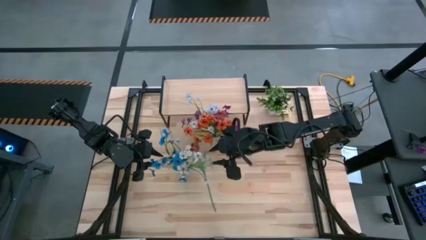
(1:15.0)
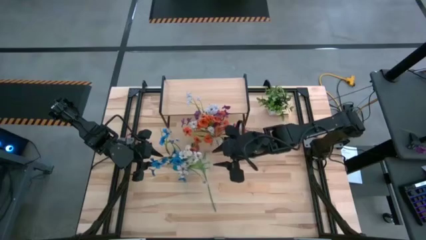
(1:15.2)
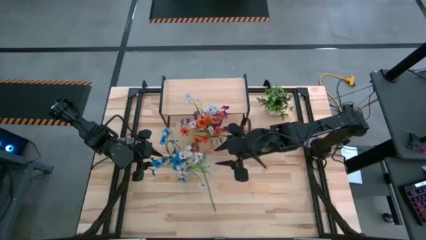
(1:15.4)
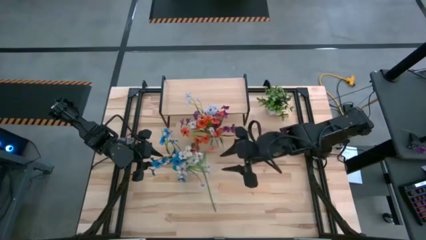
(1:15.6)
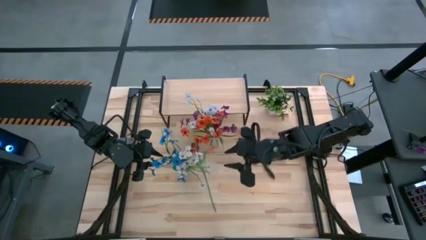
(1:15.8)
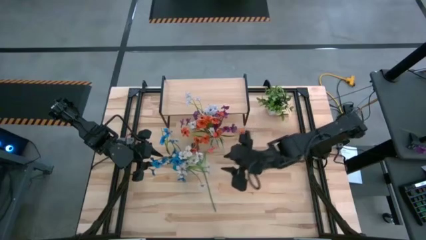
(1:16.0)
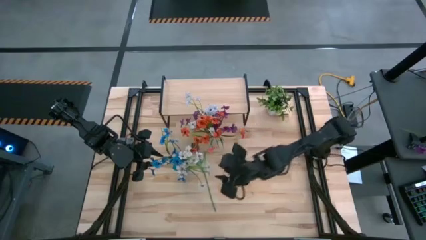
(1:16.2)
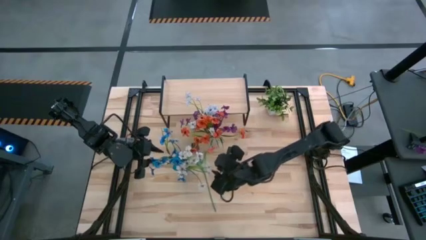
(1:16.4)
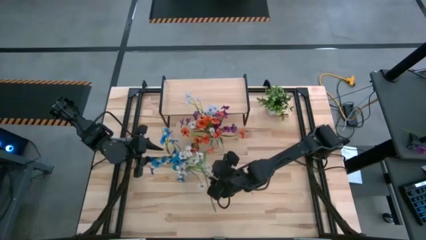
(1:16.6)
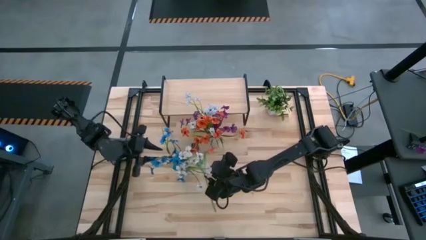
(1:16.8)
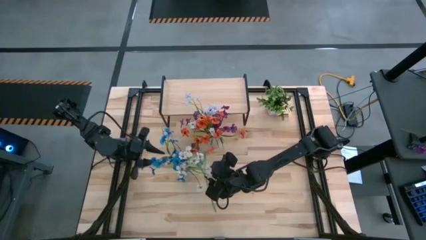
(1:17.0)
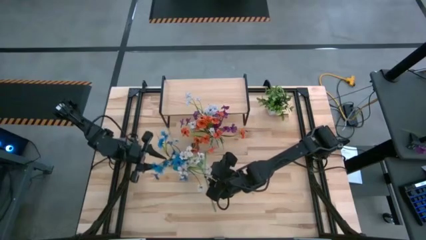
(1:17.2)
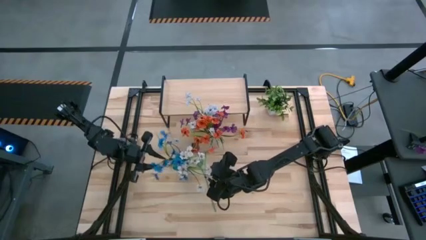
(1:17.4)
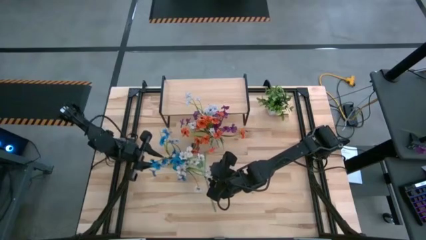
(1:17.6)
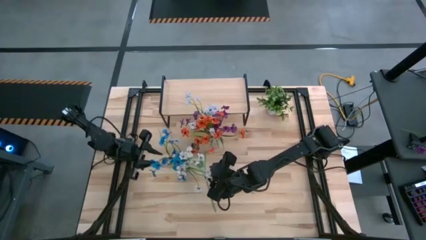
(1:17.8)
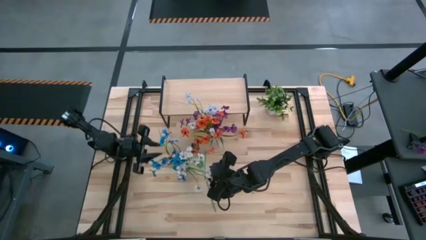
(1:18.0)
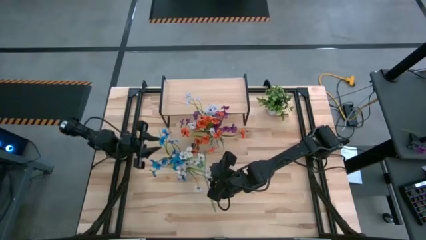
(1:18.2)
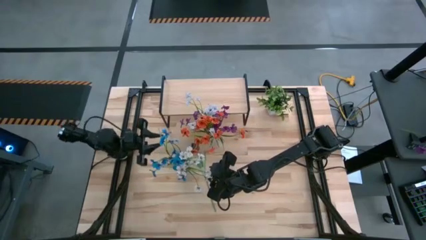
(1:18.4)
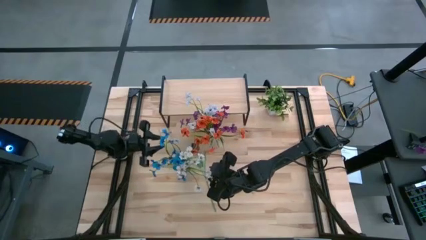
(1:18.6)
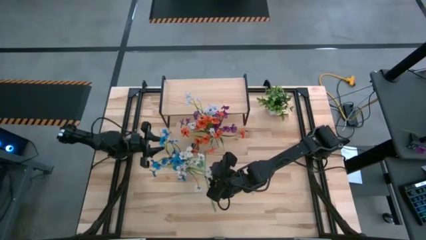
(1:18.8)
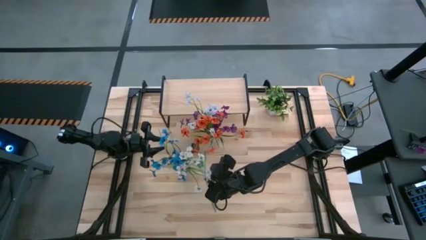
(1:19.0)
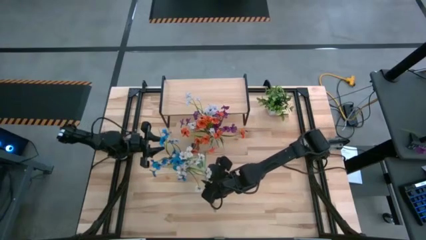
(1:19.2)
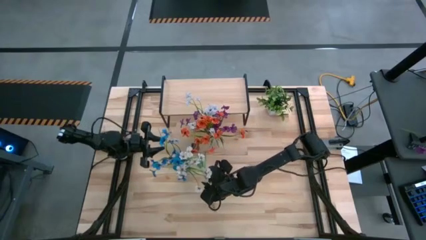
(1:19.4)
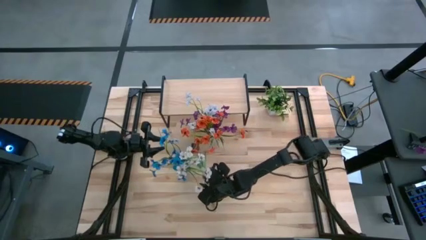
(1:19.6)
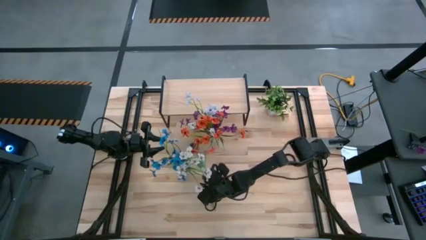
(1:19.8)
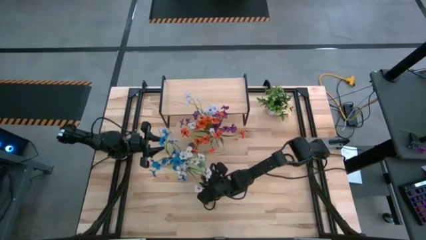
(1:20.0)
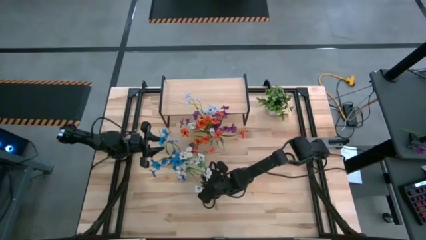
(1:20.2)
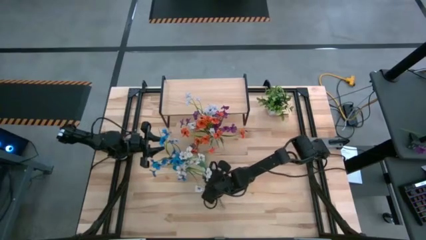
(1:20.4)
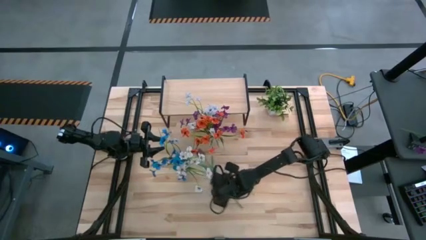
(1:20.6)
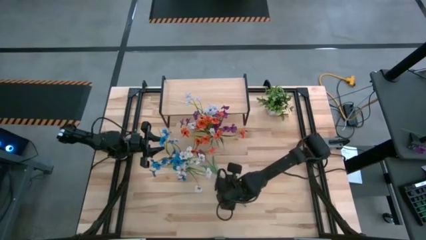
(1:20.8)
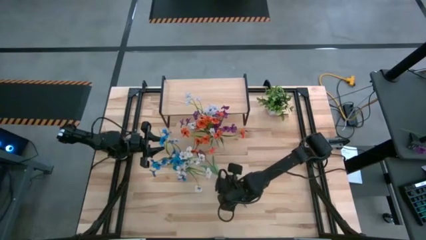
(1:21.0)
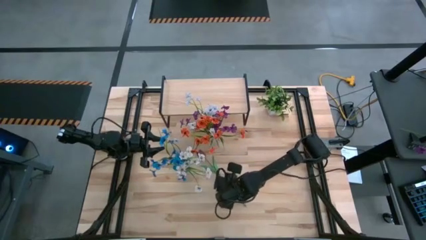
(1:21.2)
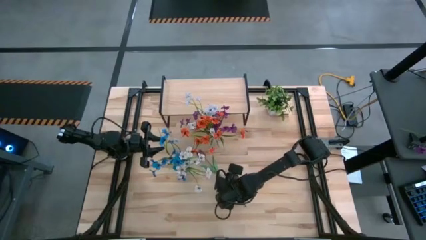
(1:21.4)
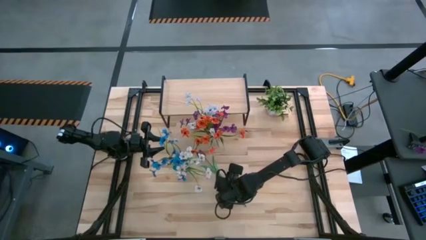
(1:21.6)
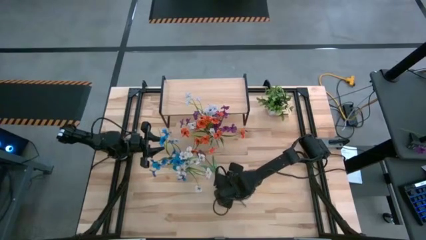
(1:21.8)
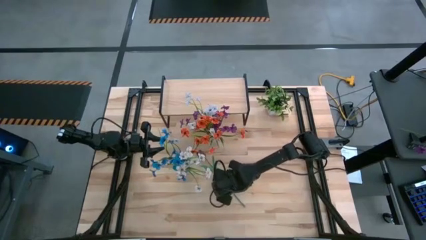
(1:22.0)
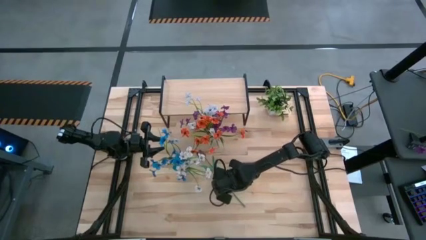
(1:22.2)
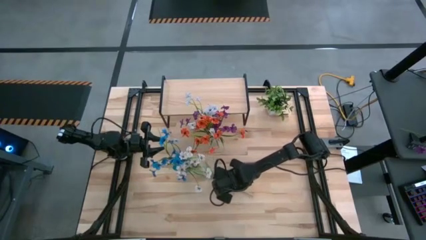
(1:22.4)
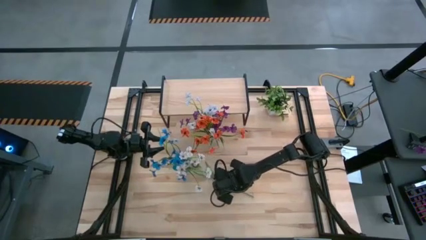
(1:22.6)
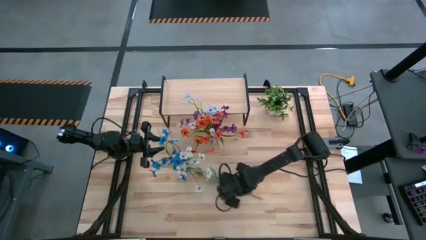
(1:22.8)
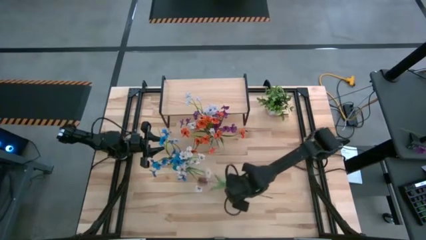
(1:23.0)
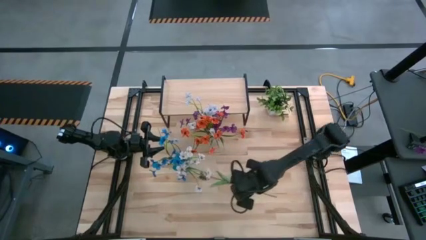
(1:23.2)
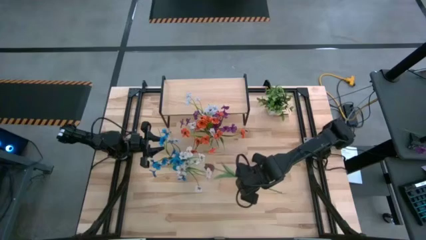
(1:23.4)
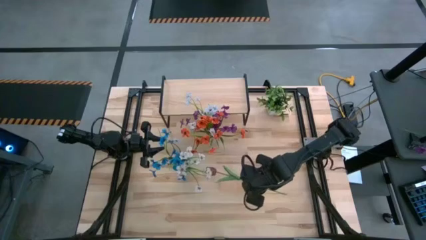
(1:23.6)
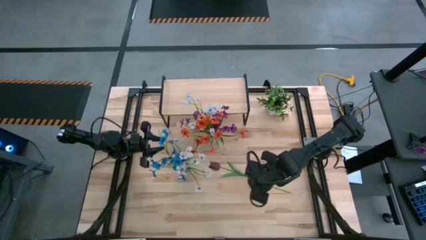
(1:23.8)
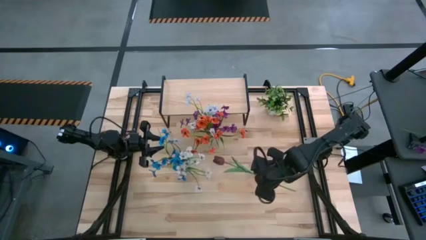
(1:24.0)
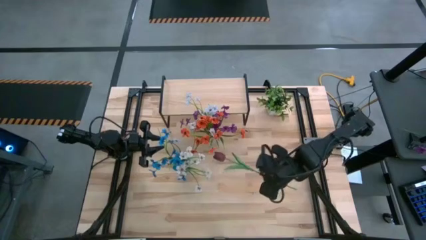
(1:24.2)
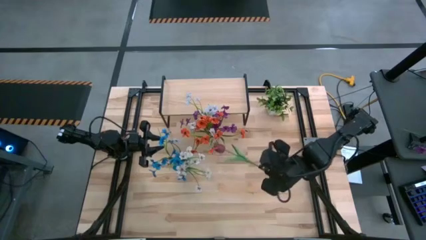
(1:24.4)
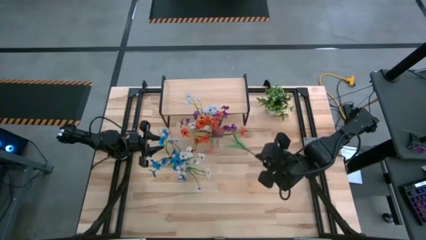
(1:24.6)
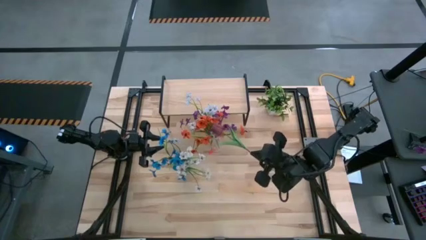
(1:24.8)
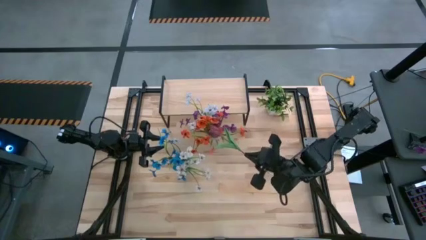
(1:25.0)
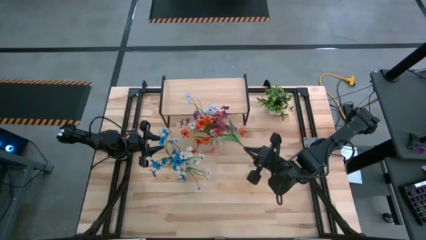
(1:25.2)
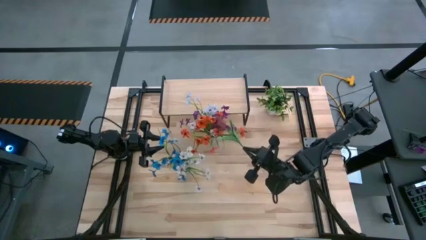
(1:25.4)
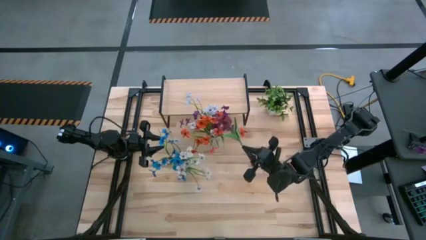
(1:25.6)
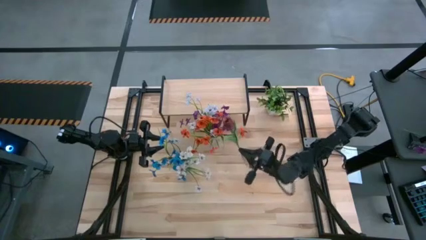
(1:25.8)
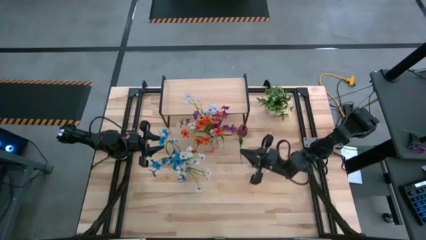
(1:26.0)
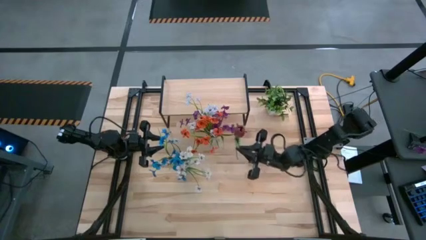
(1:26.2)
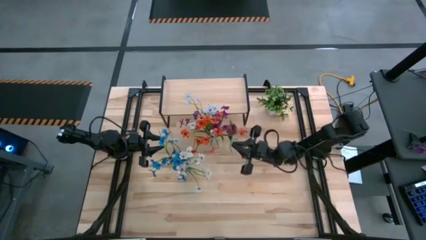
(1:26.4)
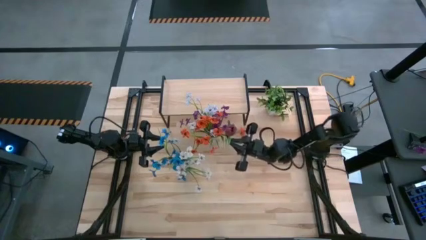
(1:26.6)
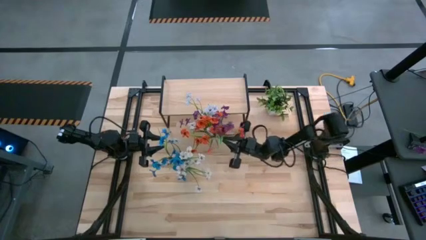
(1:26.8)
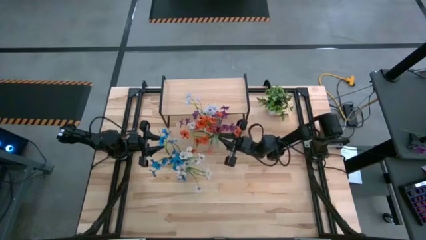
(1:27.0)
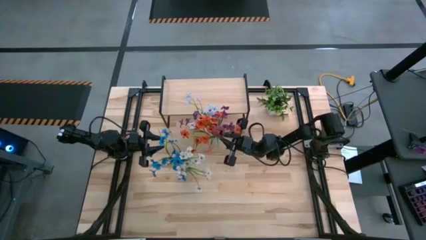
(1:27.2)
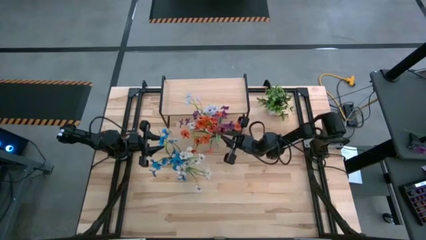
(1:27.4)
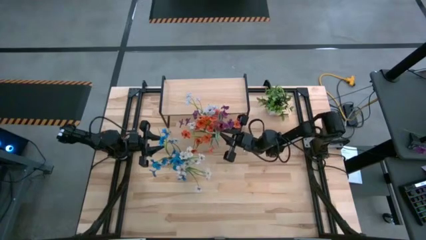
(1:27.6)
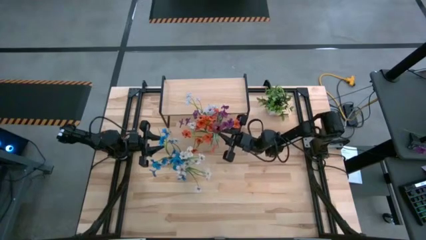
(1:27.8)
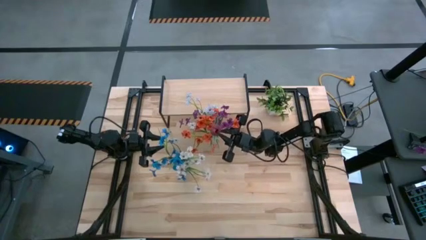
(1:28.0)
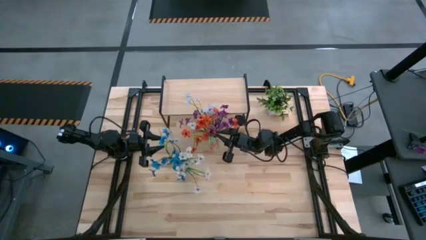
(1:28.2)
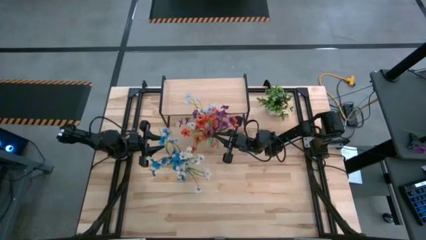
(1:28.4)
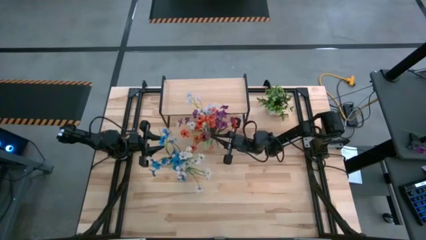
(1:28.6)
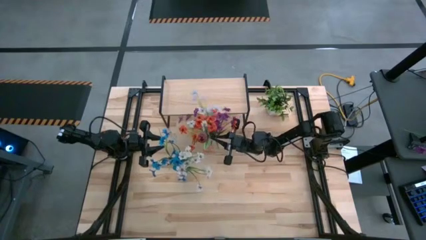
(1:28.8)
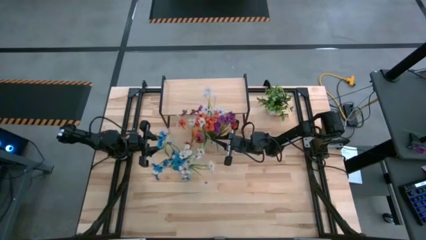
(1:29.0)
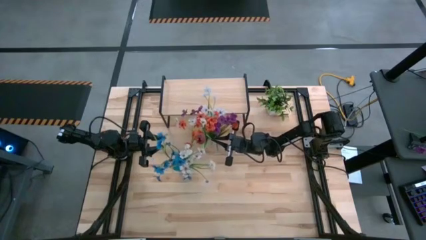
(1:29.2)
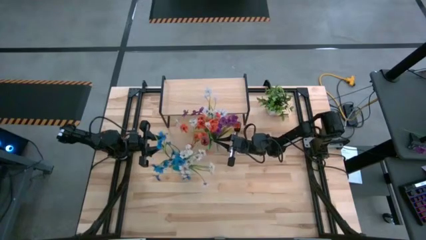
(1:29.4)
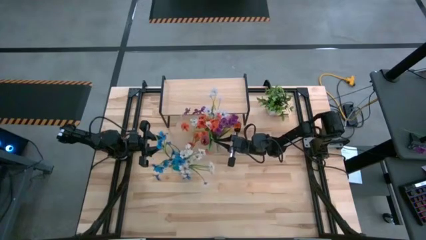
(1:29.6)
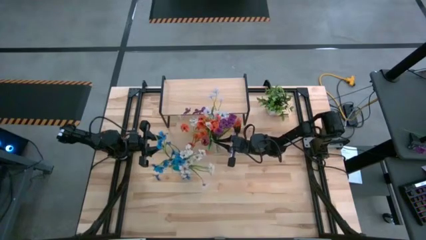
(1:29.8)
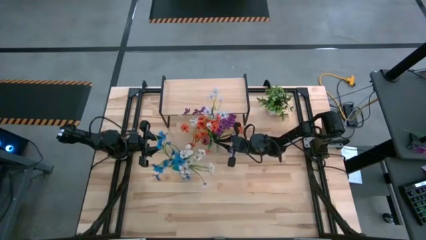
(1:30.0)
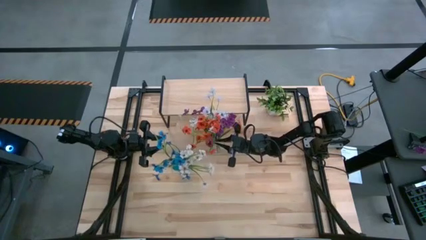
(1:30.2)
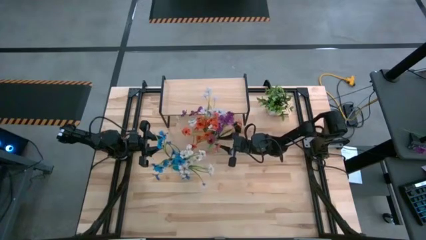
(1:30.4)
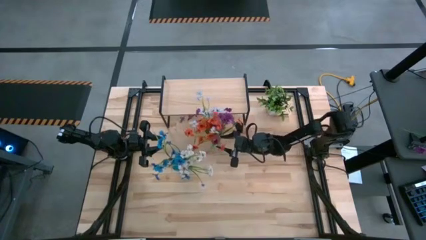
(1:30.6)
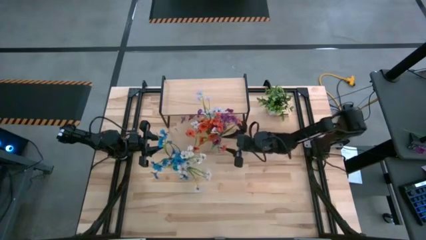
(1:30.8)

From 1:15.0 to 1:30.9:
Task: Pick and place flowers into a vace then onto a shelf
Put the red flower into the transparent vase
